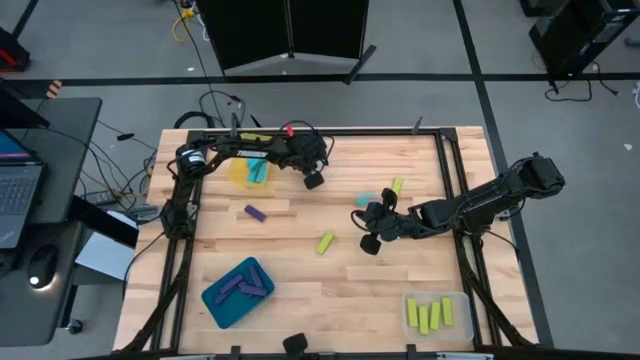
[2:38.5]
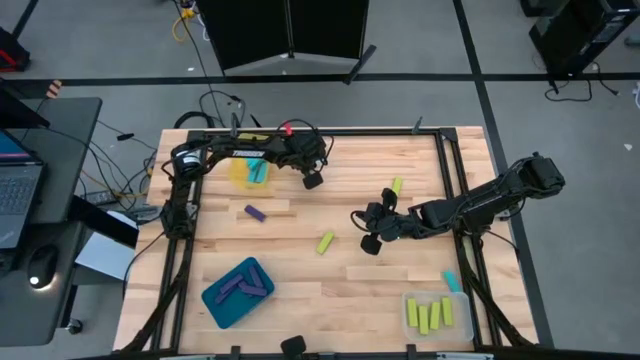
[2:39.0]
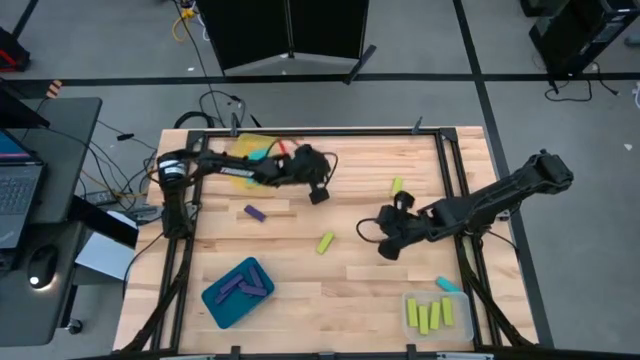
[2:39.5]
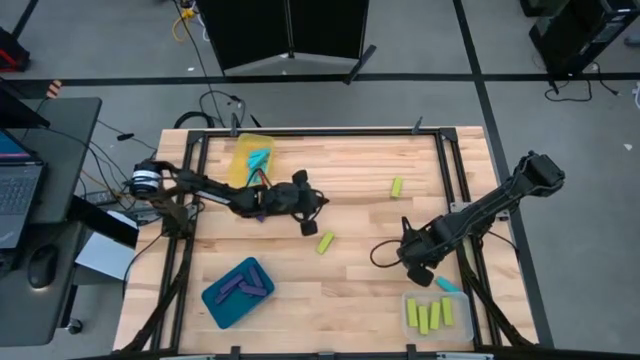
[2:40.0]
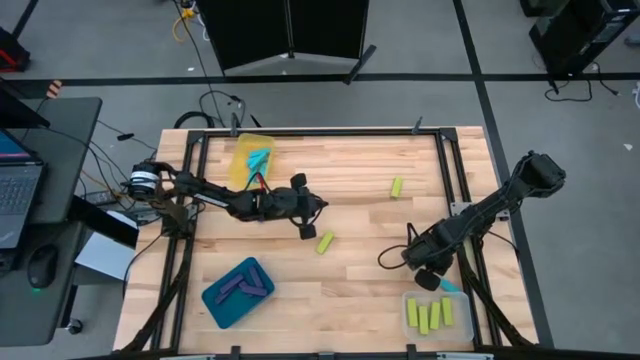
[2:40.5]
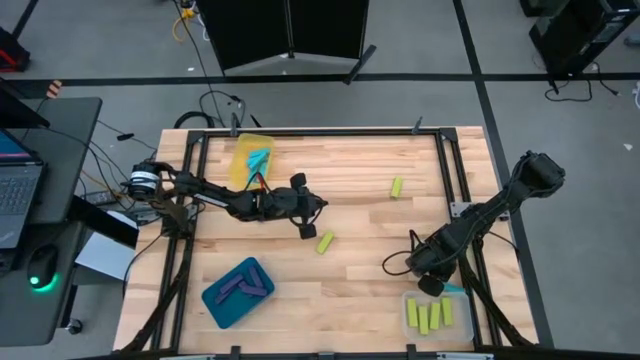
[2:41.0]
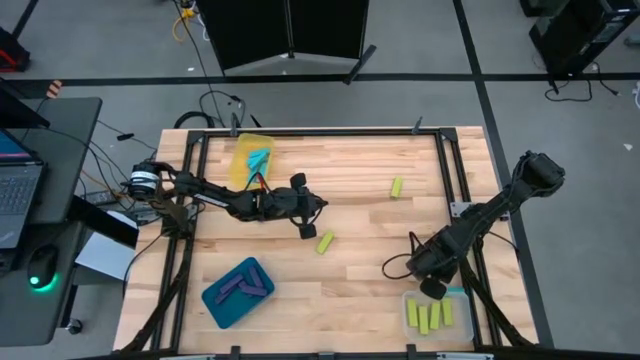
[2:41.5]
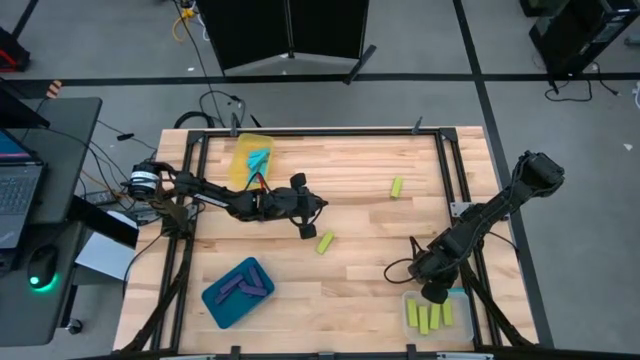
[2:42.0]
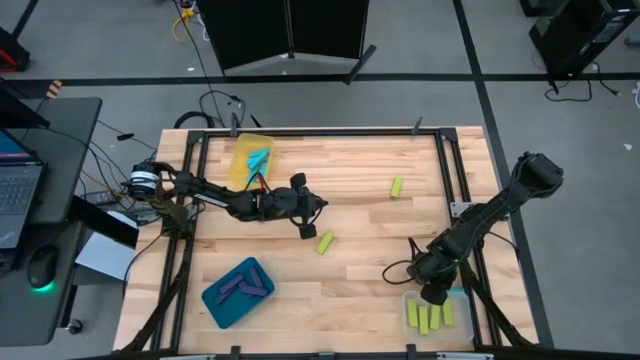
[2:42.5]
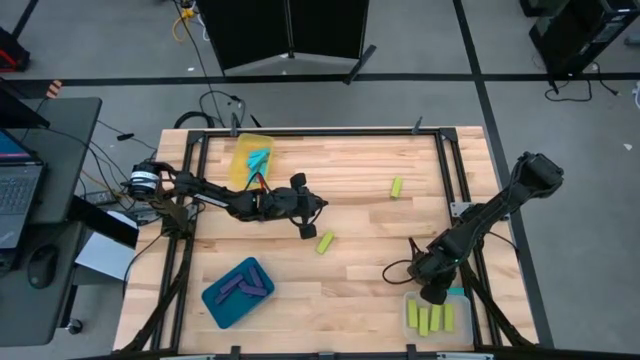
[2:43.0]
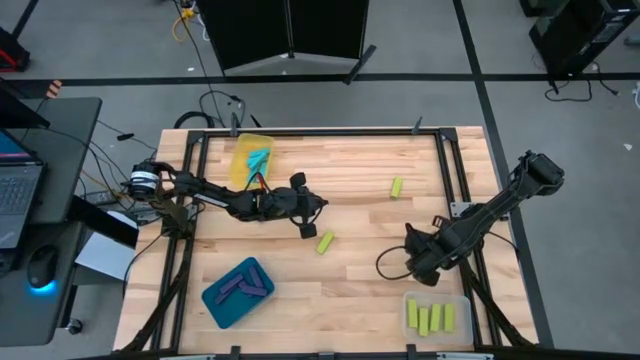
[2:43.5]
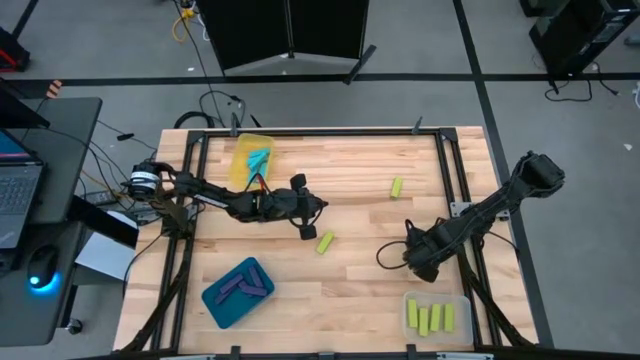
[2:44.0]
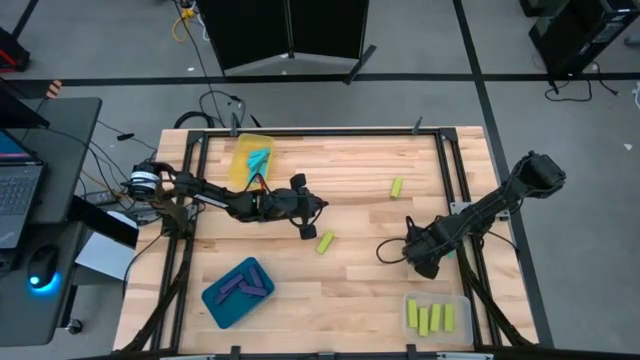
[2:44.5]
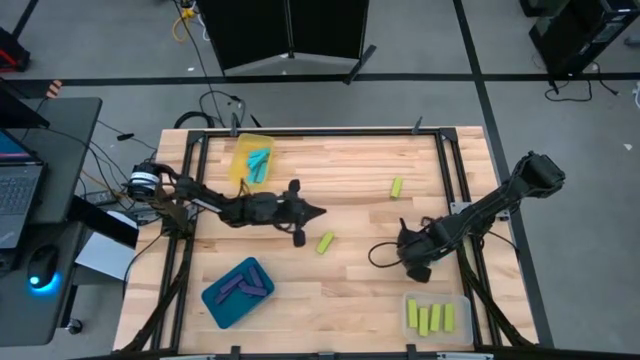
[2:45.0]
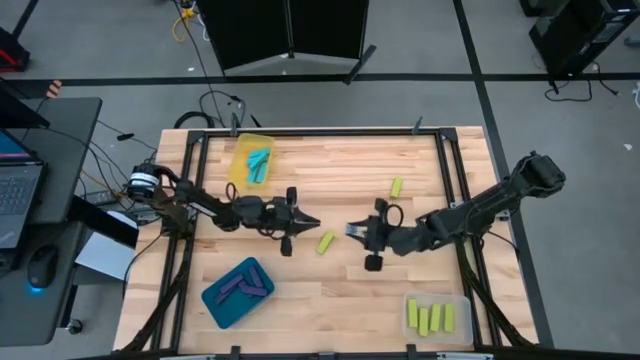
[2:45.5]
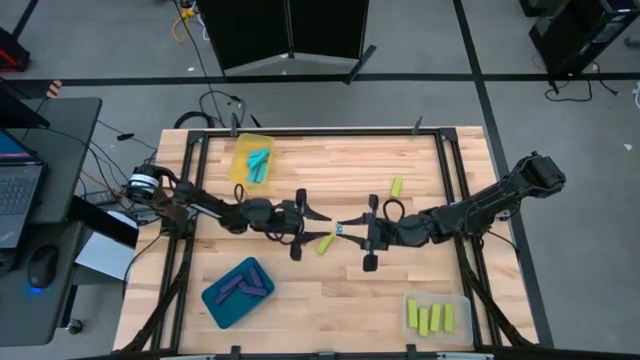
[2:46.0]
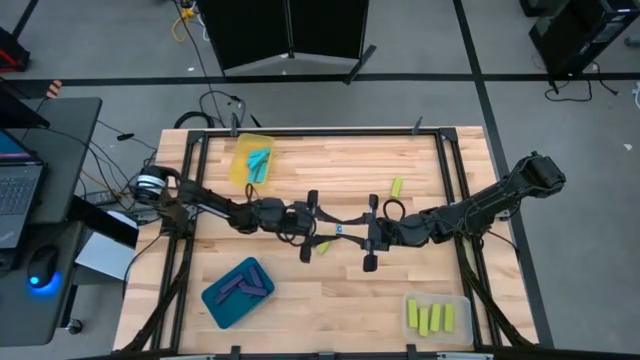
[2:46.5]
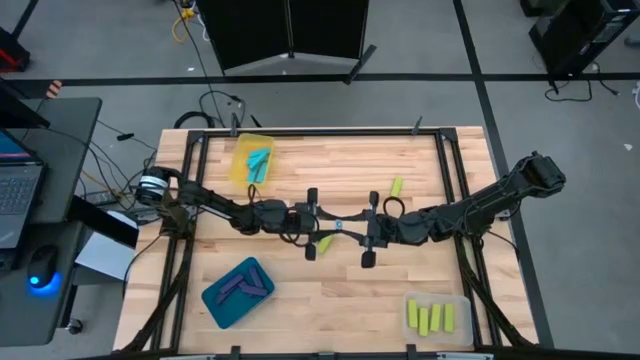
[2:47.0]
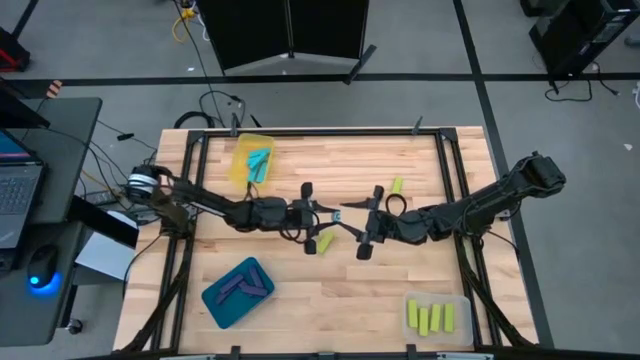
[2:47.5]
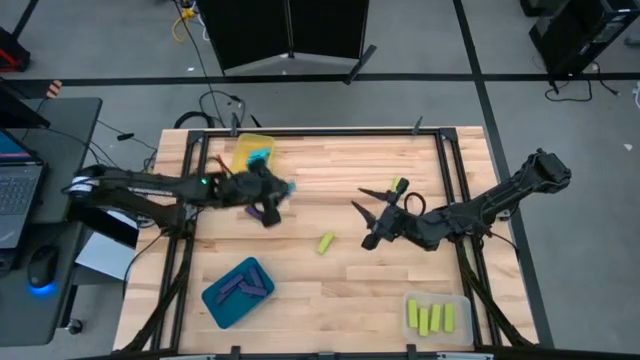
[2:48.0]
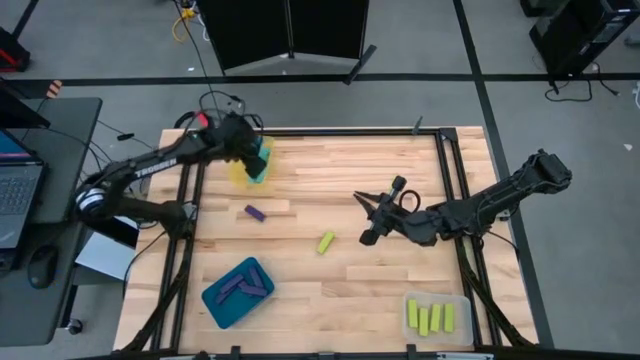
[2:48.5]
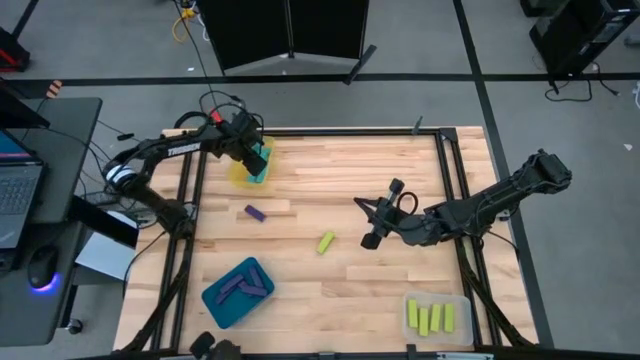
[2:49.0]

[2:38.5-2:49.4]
Task: Sort blocks
Put the blue block into the yellow bin

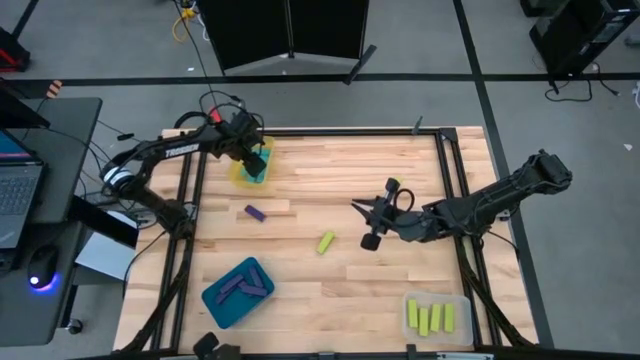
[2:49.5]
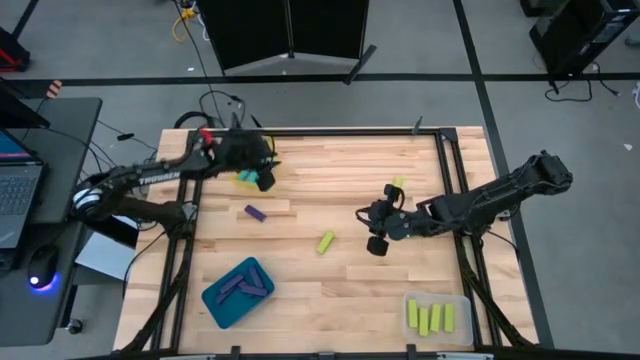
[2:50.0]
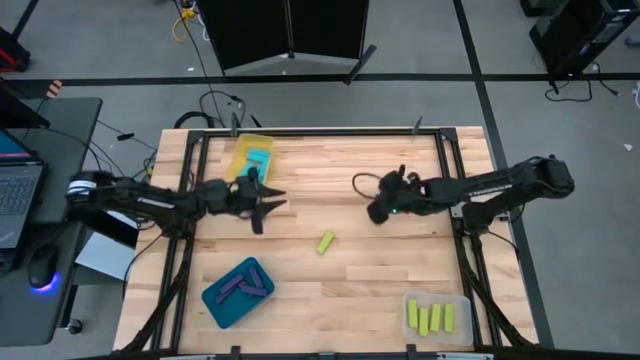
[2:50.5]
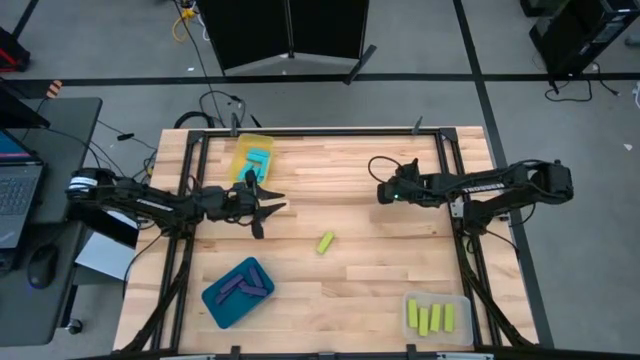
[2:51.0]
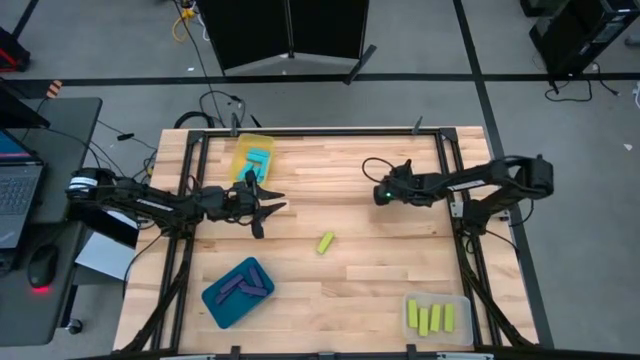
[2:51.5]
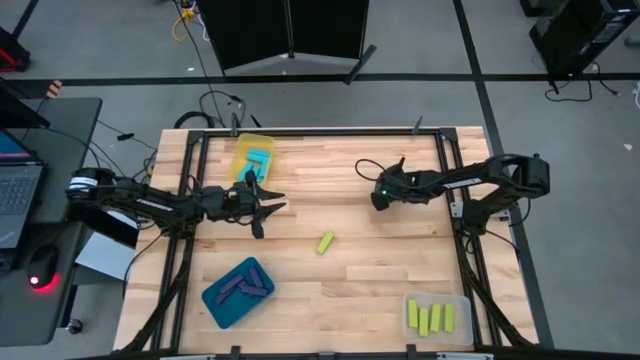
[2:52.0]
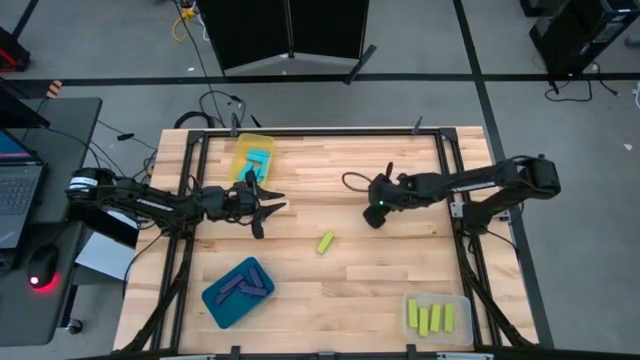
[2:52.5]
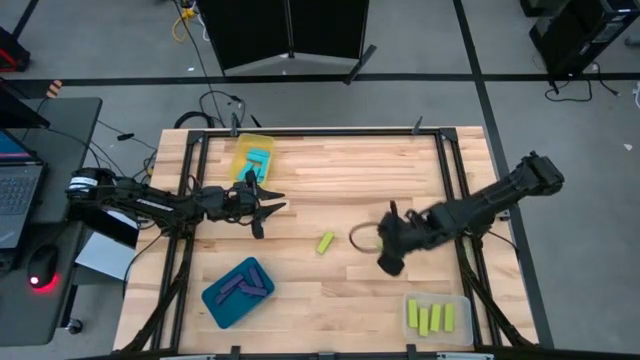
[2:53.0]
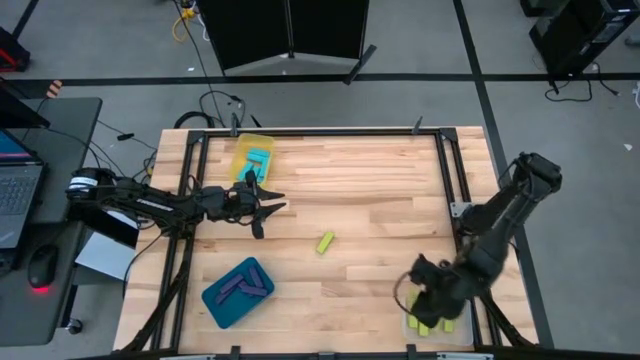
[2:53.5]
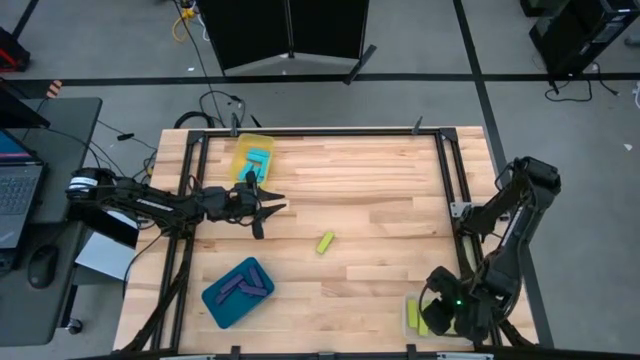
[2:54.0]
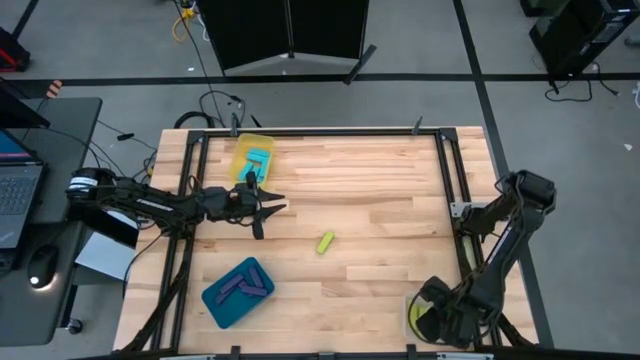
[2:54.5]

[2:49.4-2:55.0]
Put the top green block into the transparent bin

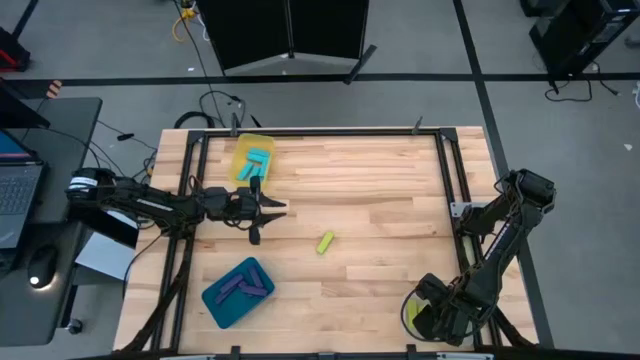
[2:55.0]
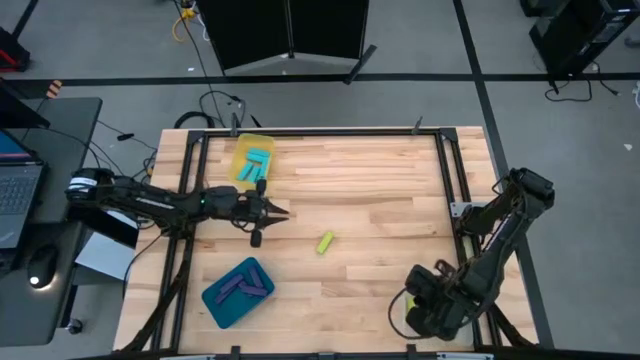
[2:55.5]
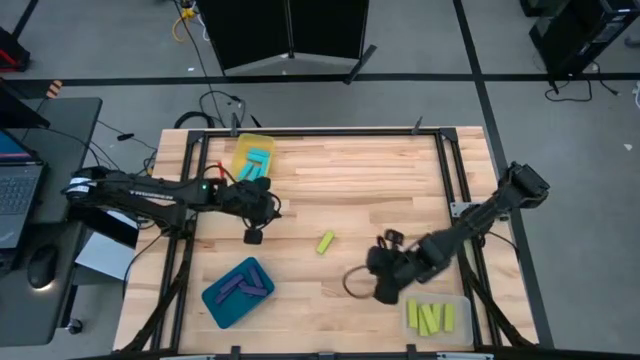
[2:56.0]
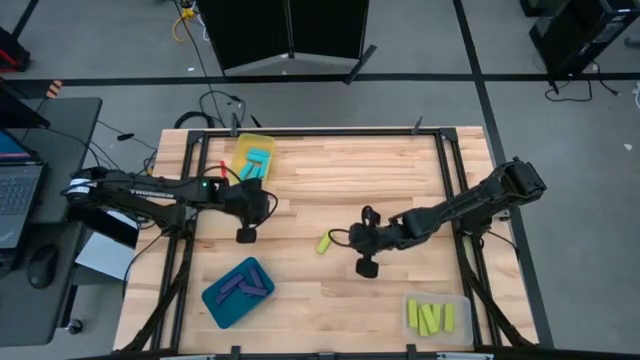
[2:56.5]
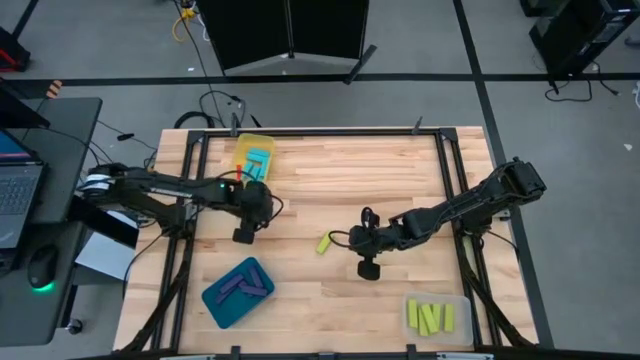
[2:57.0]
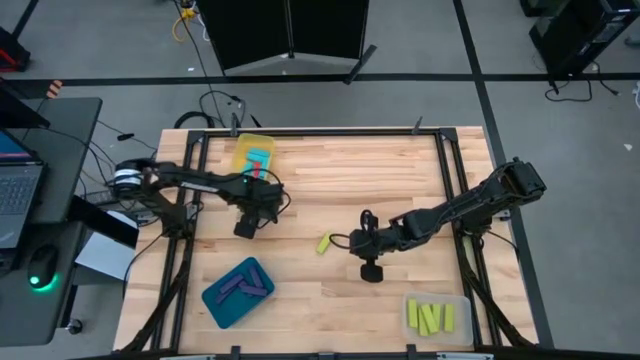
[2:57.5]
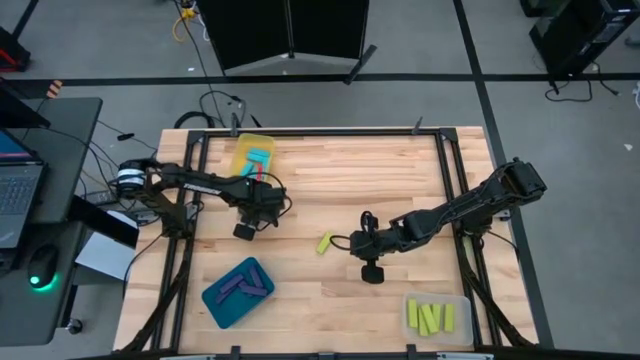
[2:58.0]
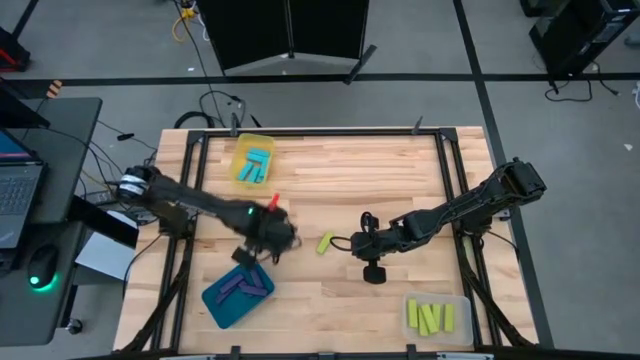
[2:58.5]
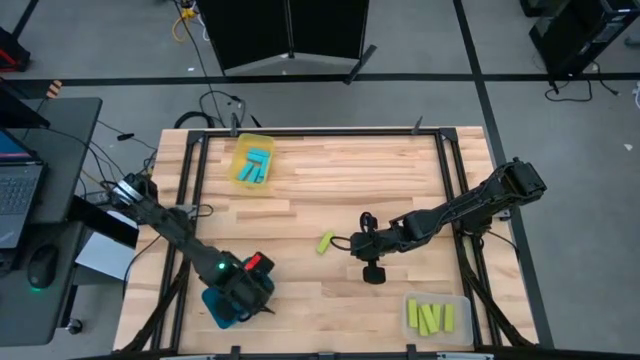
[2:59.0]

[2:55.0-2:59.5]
Put the purple block into the blue bin
